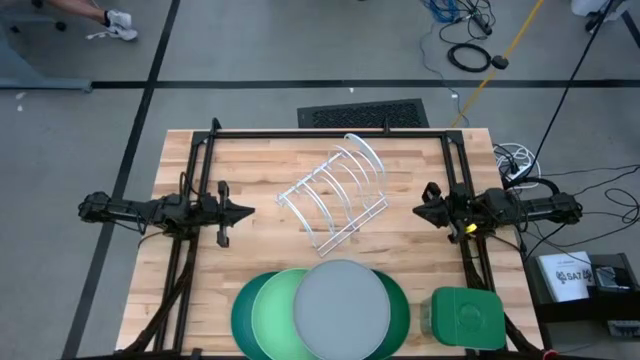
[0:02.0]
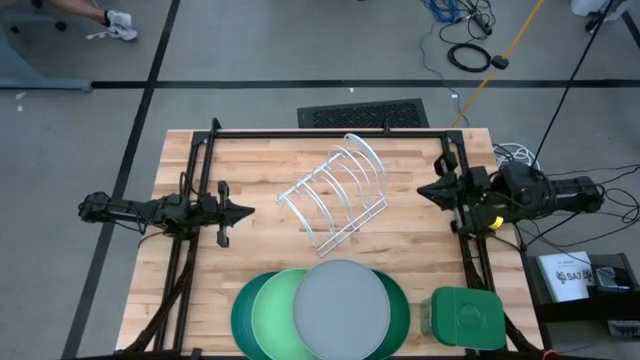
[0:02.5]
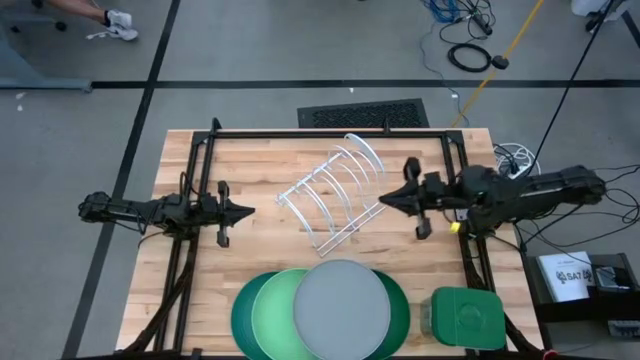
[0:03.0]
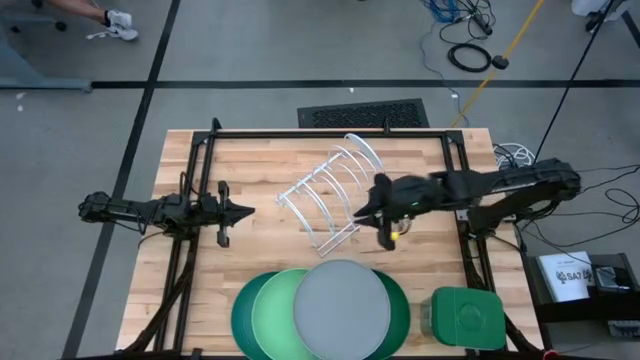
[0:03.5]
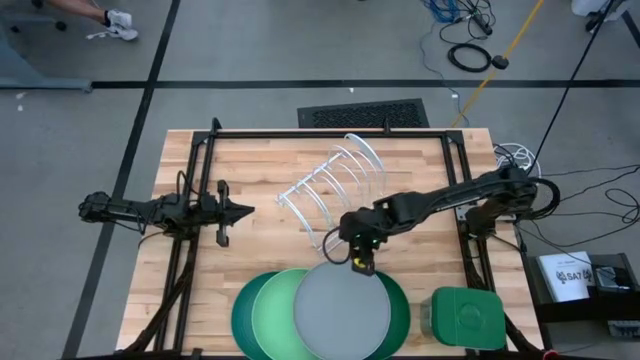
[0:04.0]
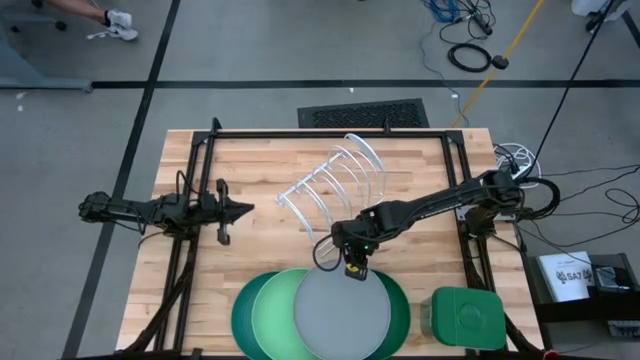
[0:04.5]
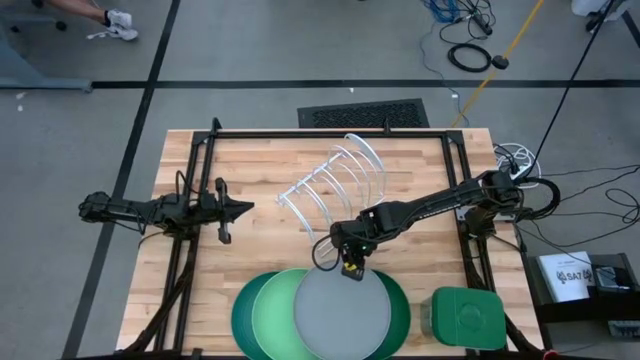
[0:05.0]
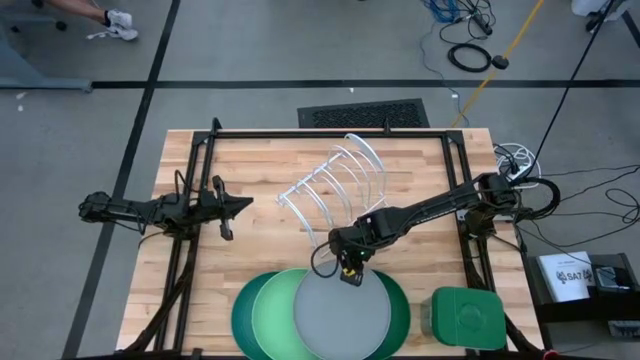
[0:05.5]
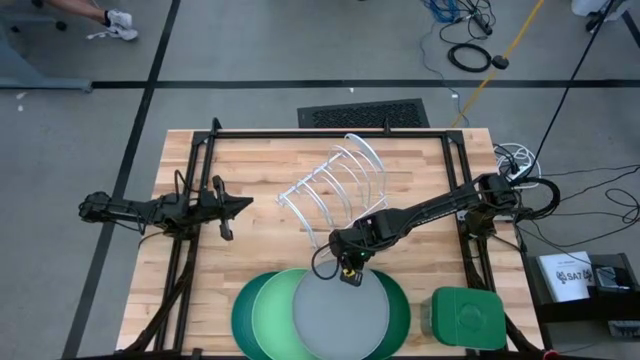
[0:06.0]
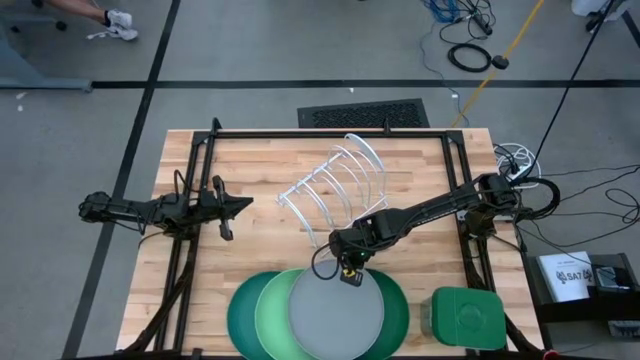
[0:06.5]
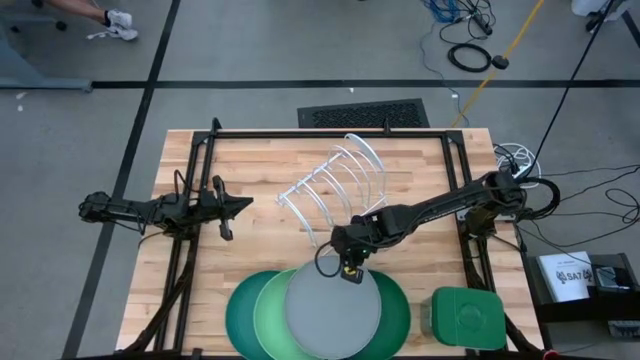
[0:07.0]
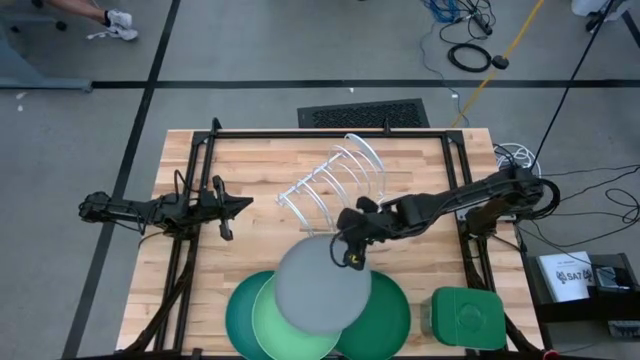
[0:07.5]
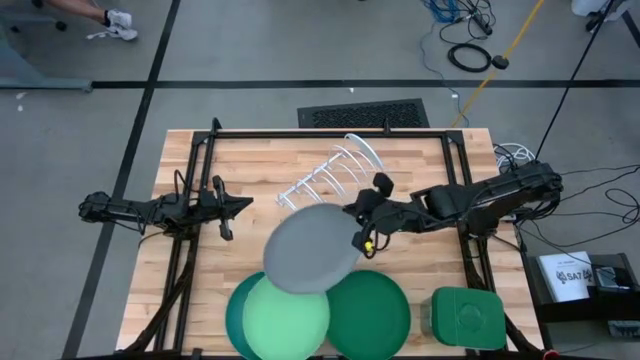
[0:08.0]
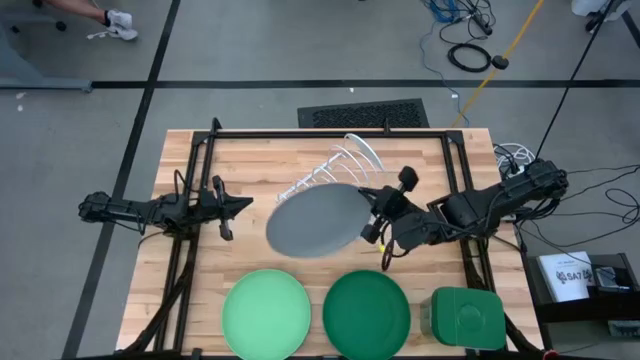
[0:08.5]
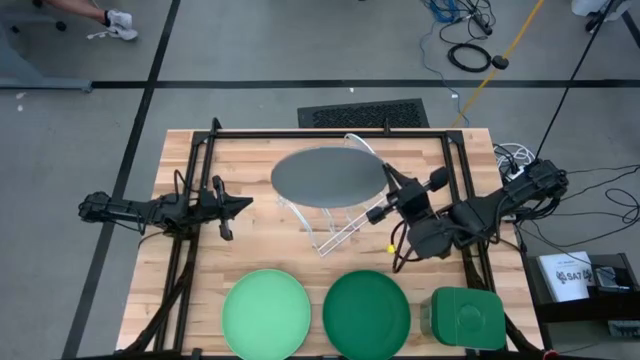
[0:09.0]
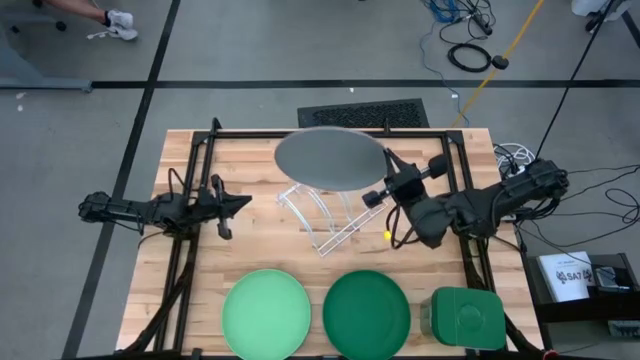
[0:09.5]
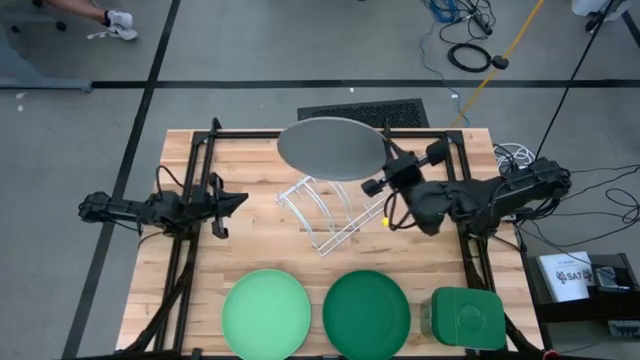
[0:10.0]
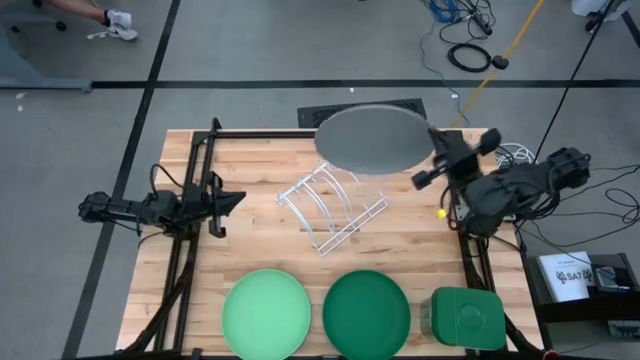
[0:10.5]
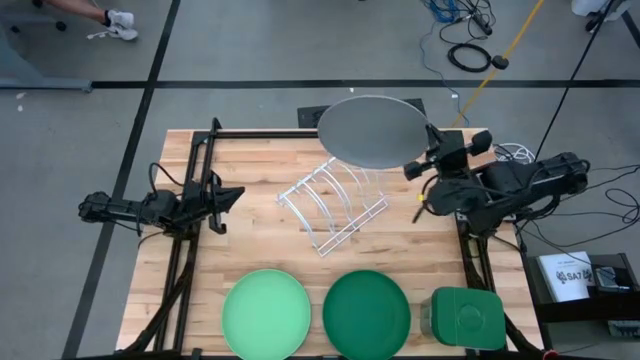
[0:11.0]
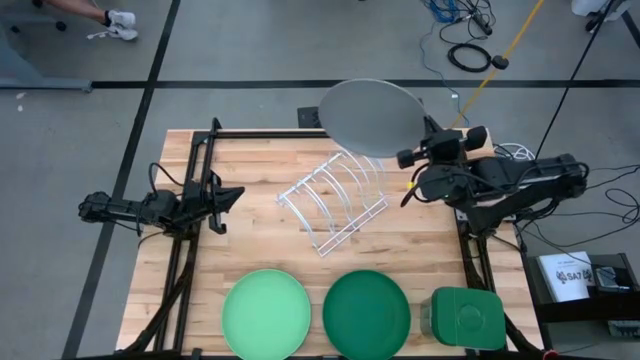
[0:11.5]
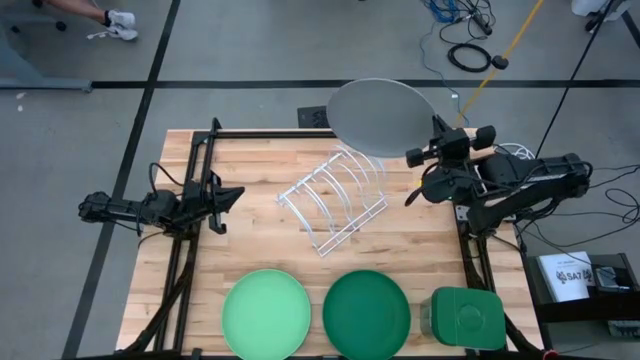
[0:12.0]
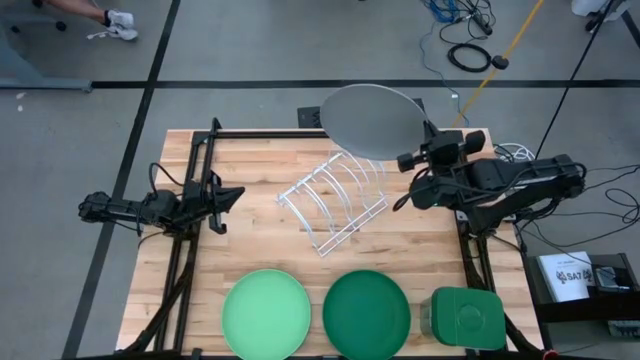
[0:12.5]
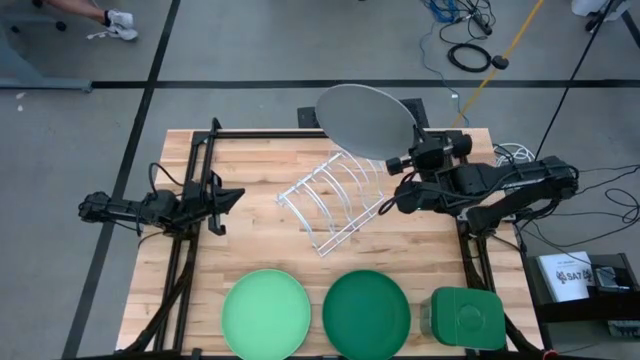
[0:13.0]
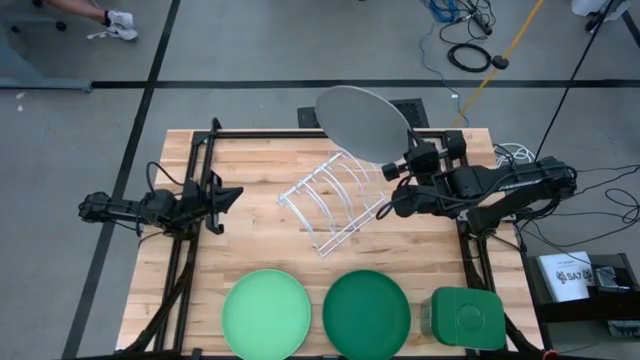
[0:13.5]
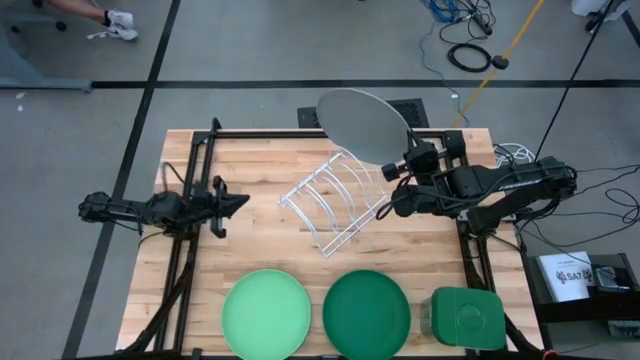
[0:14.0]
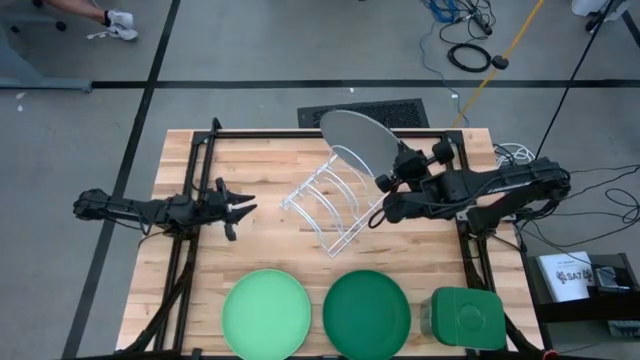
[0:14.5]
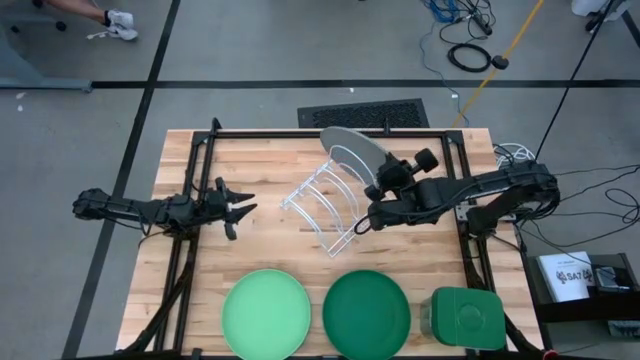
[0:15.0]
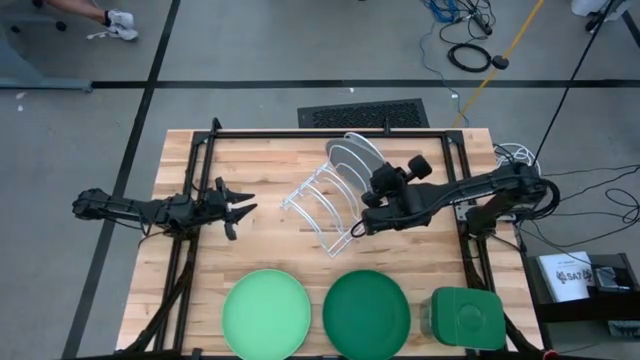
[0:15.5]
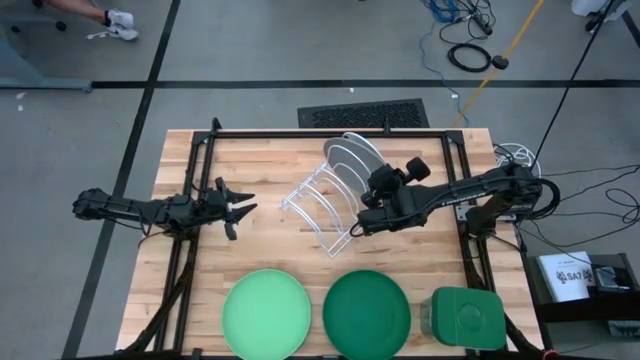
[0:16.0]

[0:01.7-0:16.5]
Task: Sort dishes
Put the gray plate into the dish rack

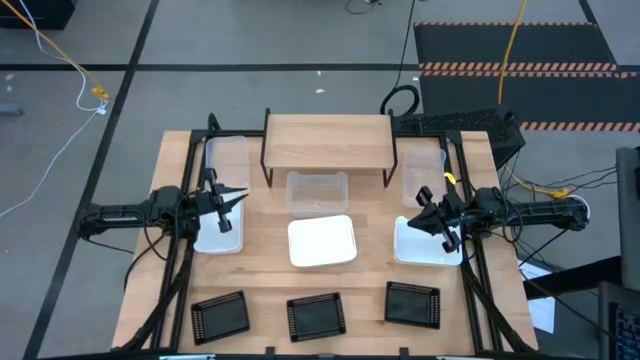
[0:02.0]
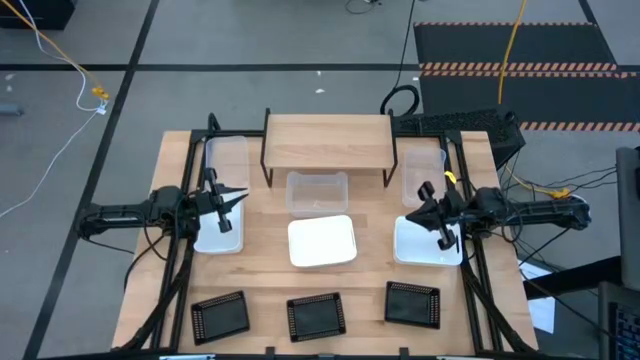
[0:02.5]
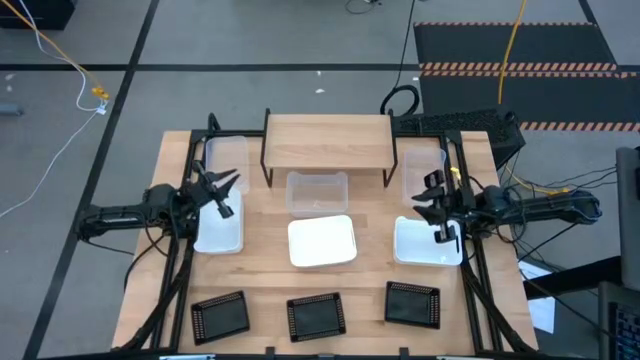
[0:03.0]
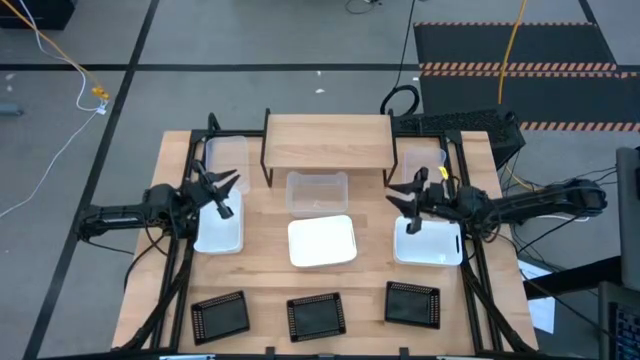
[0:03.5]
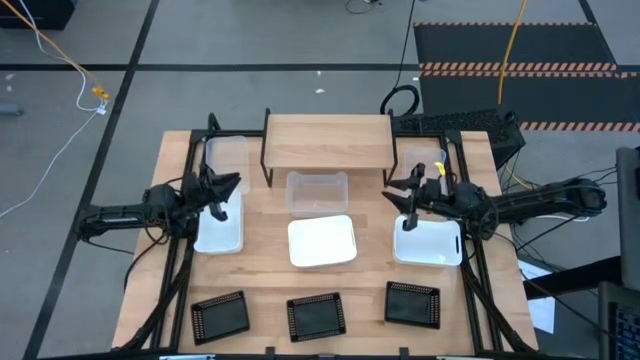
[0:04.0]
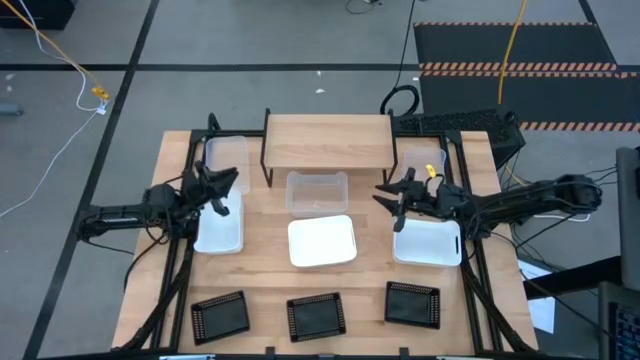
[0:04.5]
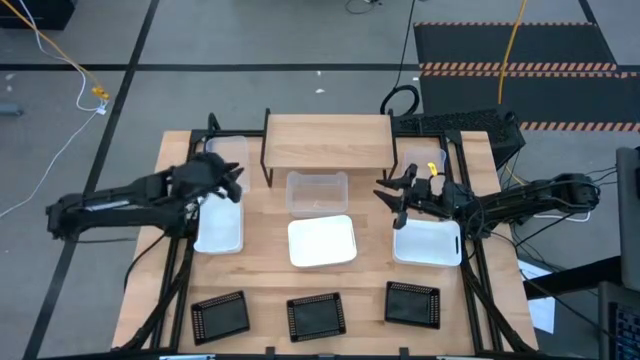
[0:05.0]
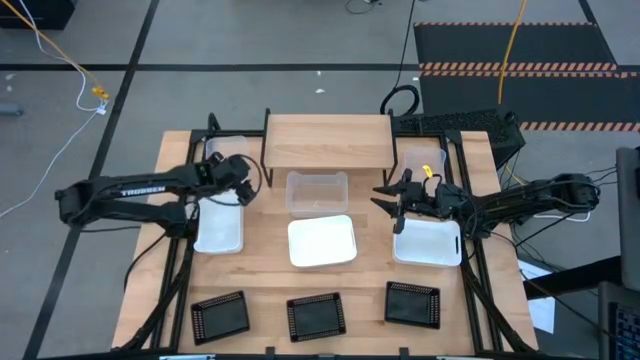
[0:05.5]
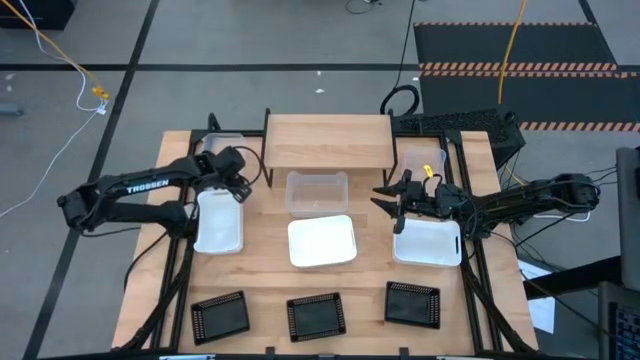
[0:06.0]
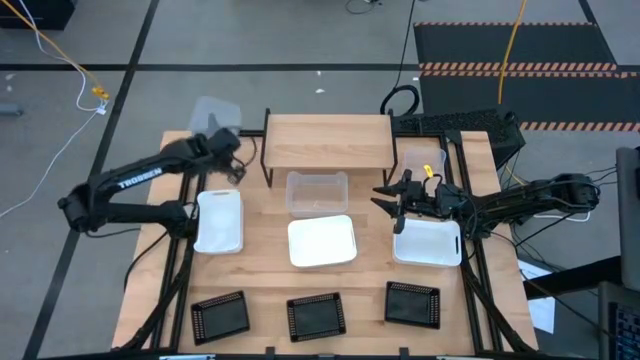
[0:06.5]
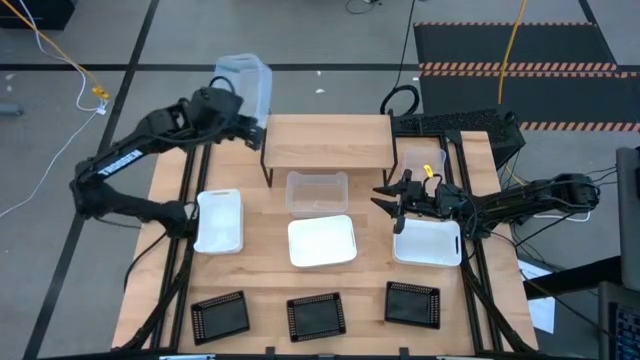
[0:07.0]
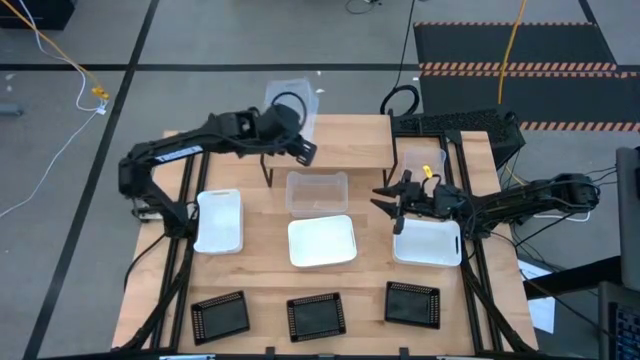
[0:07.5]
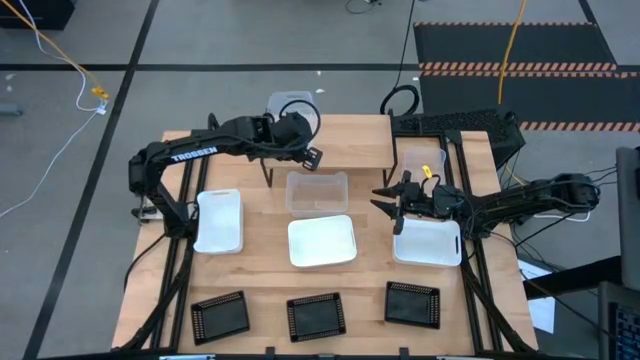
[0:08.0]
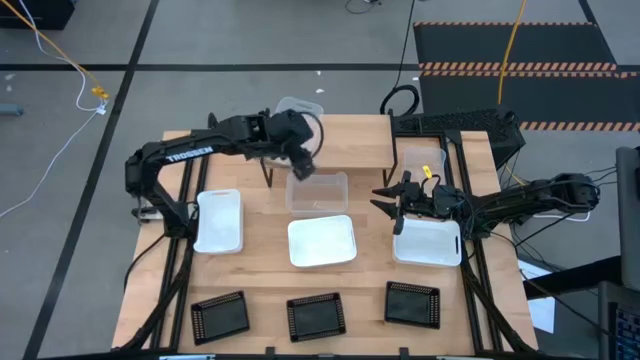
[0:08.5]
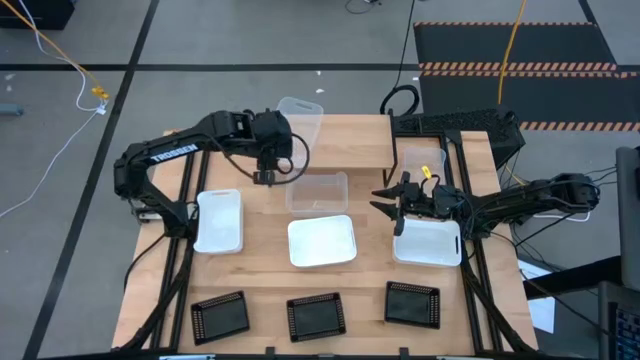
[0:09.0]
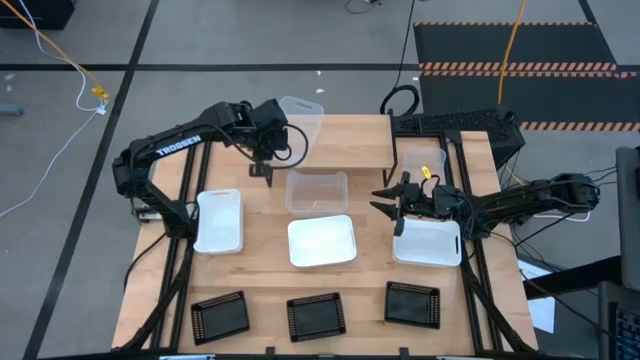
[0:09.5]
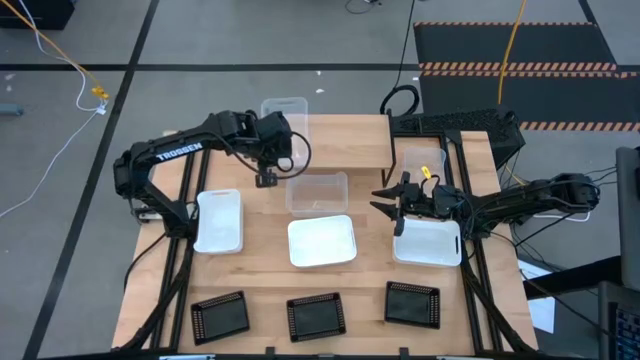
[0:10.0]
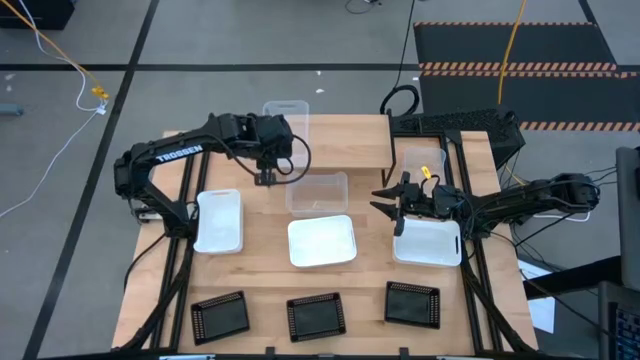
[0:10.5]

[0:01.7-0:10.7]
Task: Stack baskets on shelf by color
Put the left transparent bin on the shelf
